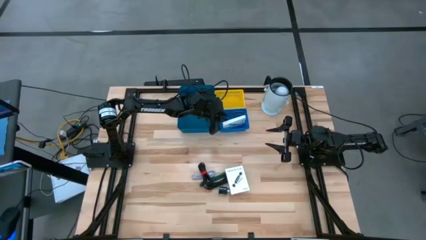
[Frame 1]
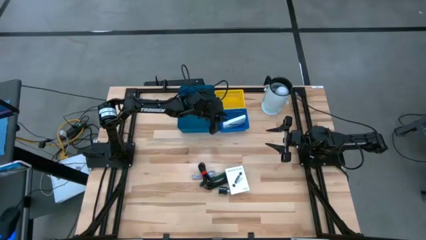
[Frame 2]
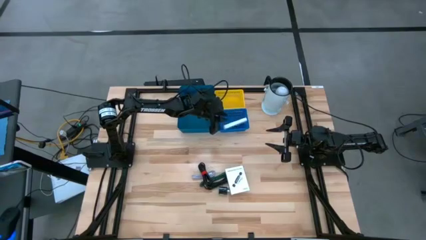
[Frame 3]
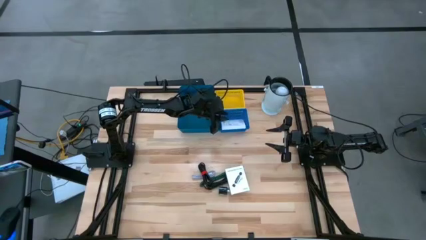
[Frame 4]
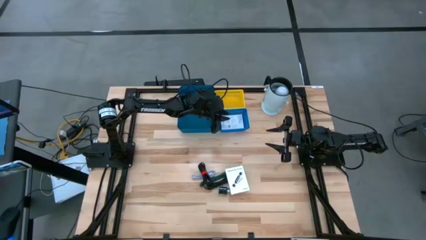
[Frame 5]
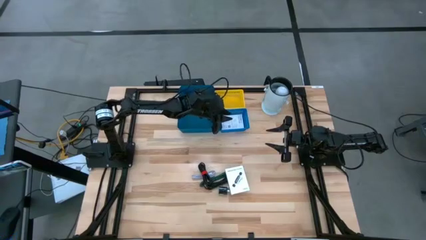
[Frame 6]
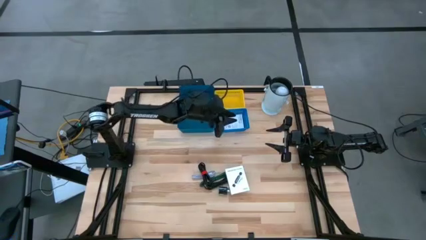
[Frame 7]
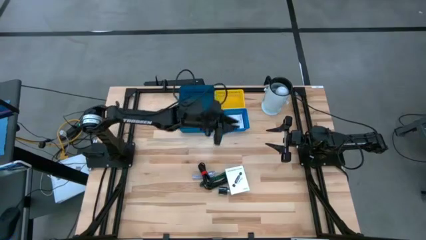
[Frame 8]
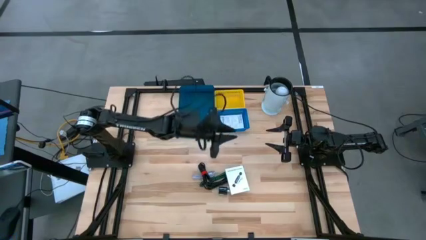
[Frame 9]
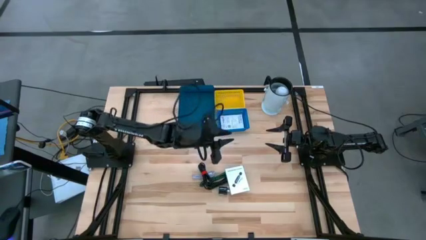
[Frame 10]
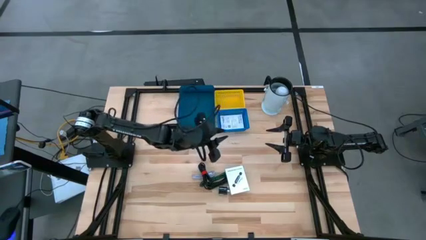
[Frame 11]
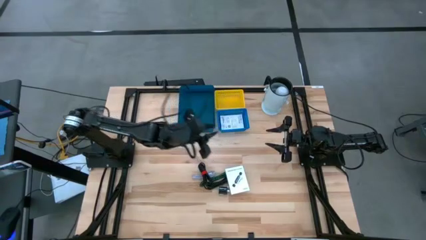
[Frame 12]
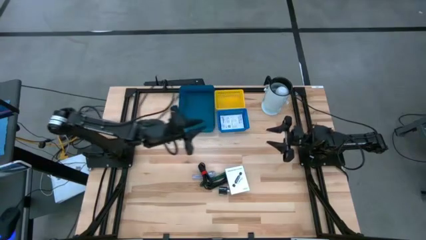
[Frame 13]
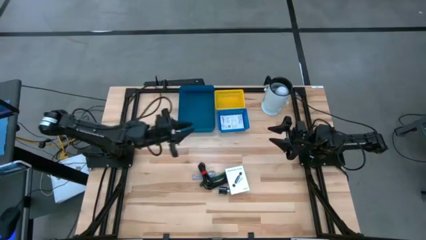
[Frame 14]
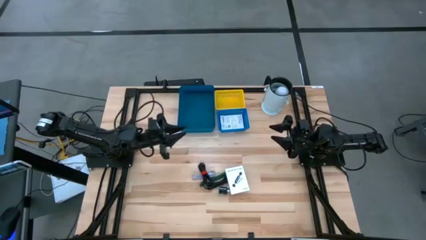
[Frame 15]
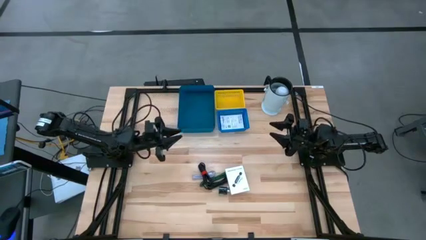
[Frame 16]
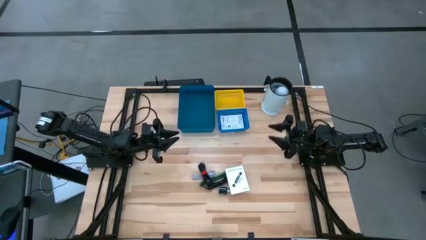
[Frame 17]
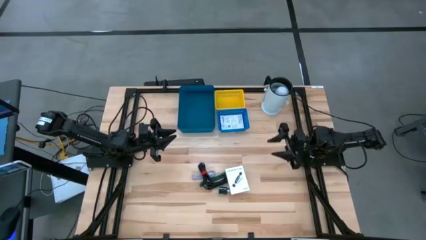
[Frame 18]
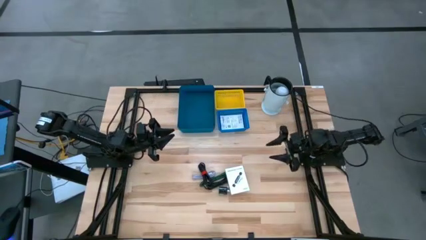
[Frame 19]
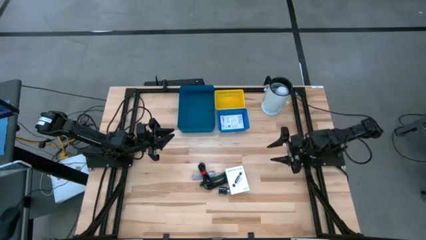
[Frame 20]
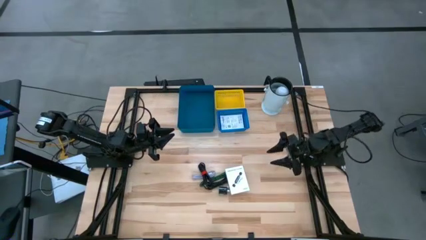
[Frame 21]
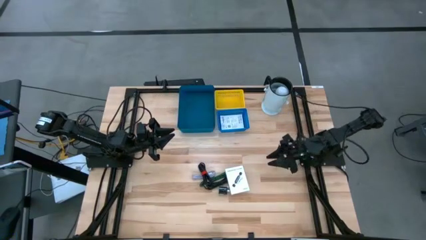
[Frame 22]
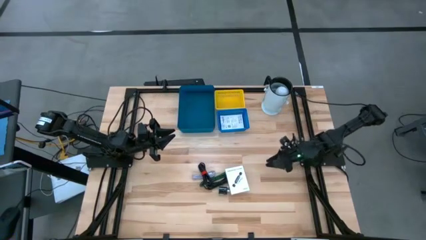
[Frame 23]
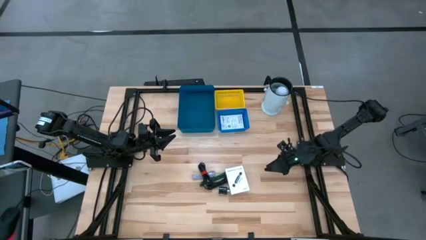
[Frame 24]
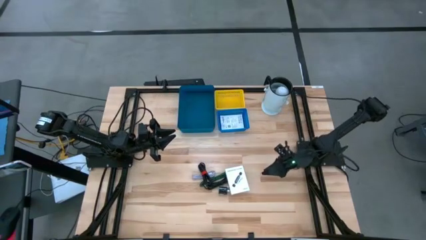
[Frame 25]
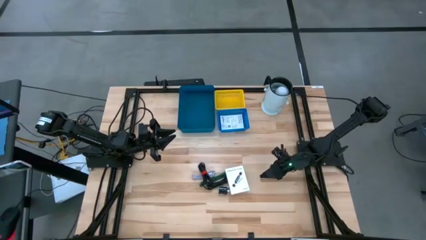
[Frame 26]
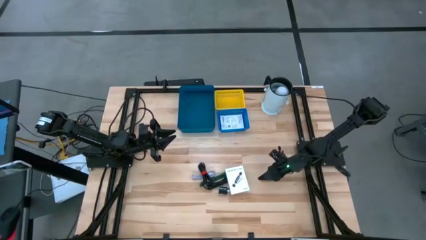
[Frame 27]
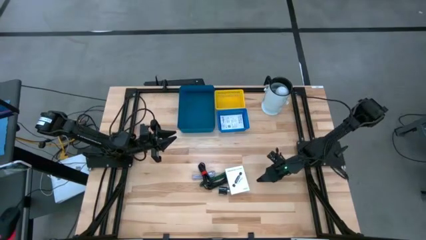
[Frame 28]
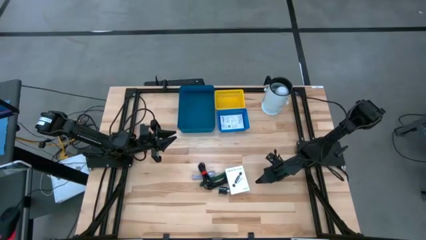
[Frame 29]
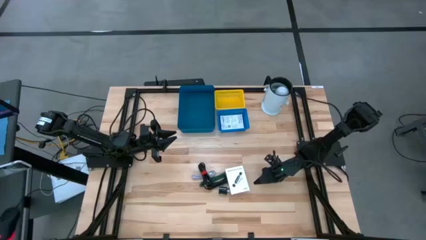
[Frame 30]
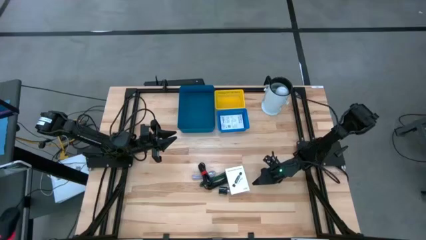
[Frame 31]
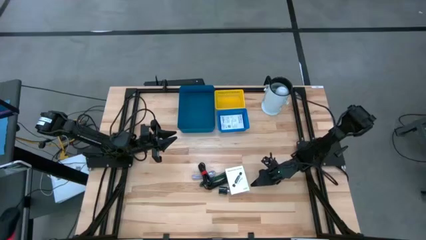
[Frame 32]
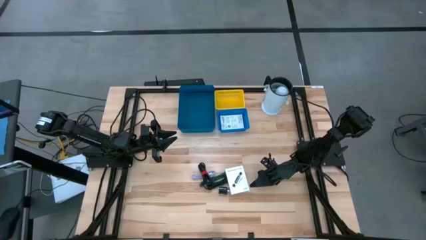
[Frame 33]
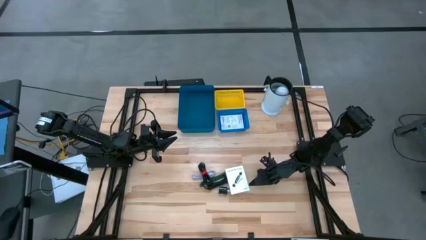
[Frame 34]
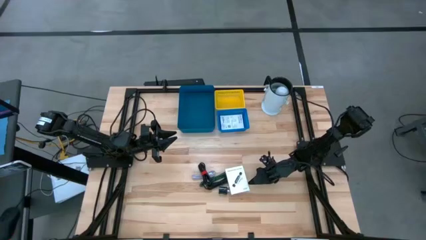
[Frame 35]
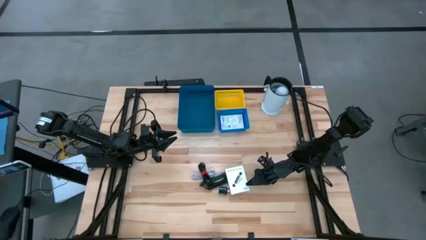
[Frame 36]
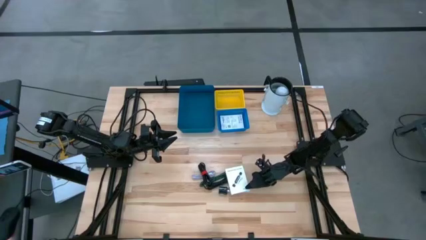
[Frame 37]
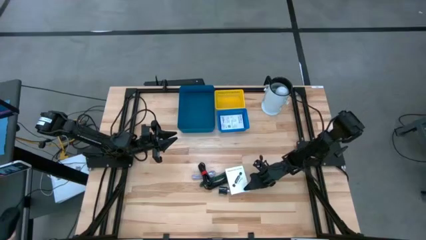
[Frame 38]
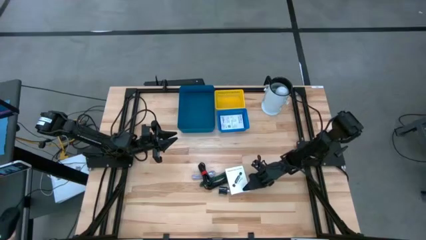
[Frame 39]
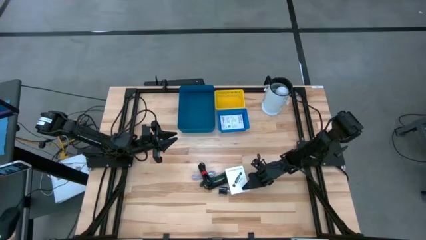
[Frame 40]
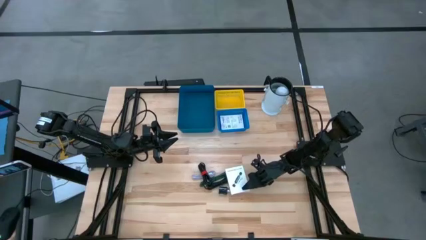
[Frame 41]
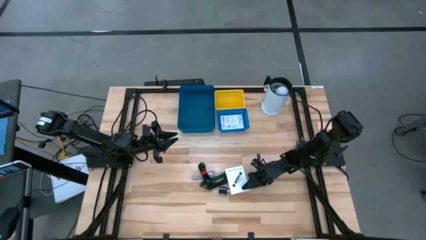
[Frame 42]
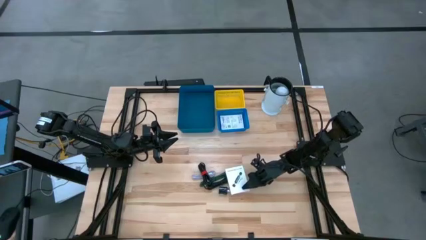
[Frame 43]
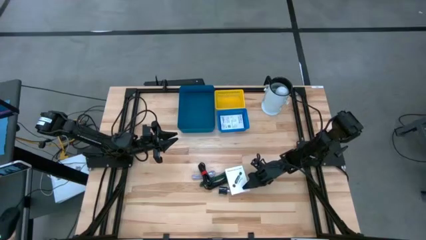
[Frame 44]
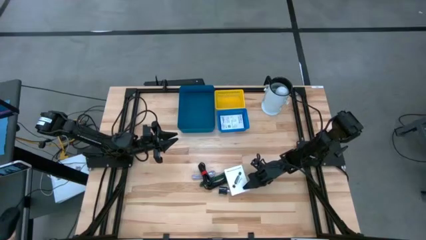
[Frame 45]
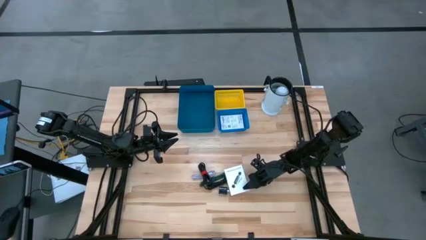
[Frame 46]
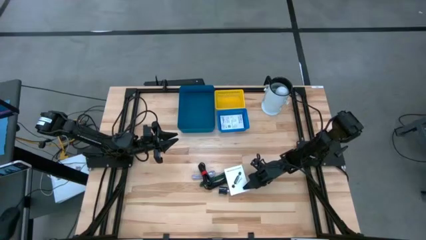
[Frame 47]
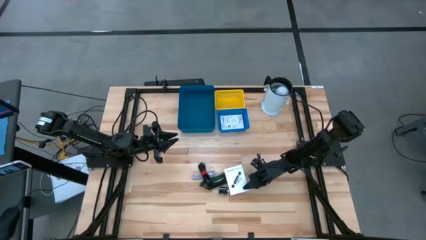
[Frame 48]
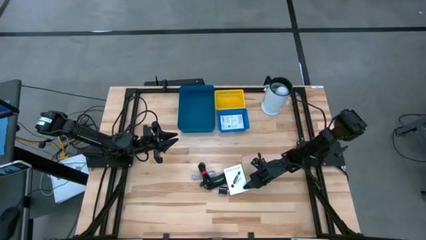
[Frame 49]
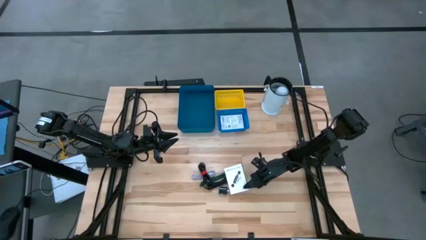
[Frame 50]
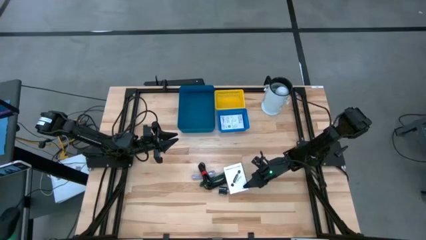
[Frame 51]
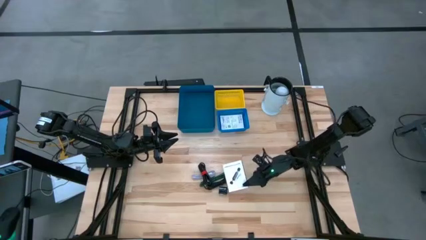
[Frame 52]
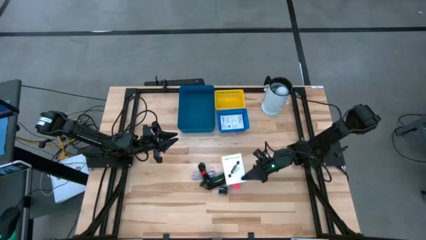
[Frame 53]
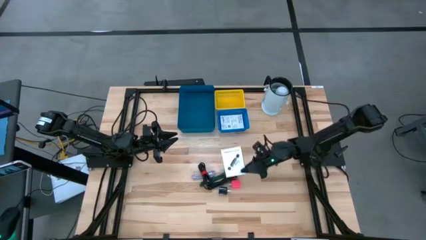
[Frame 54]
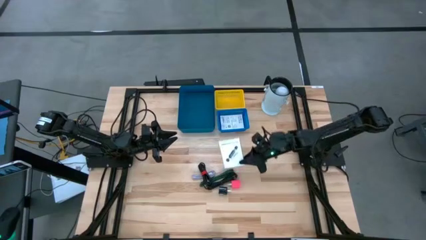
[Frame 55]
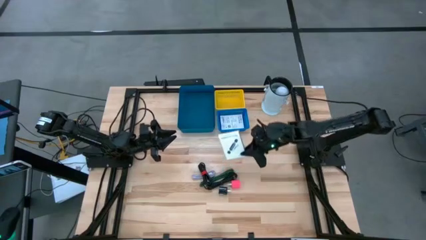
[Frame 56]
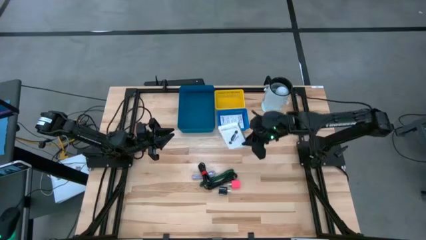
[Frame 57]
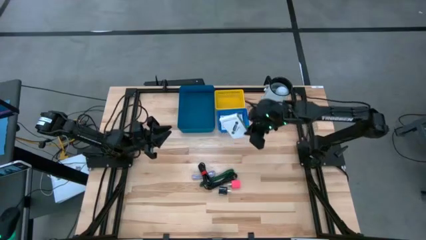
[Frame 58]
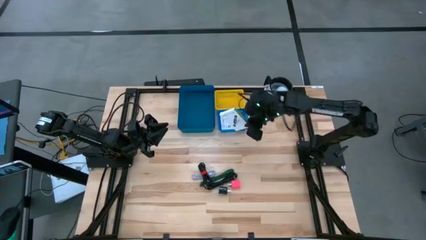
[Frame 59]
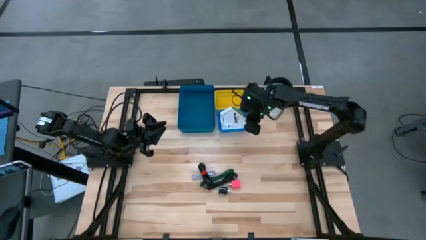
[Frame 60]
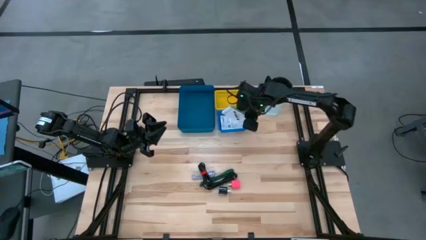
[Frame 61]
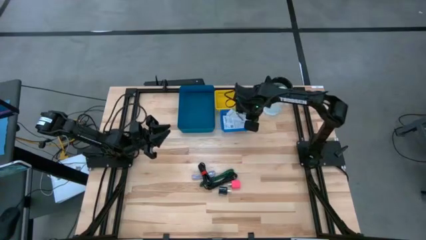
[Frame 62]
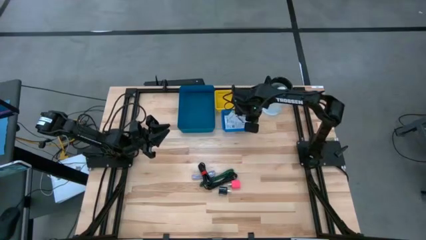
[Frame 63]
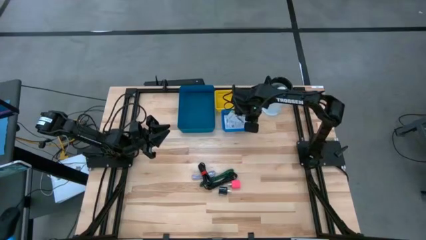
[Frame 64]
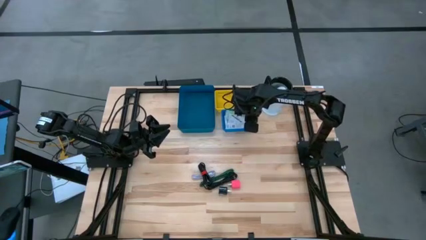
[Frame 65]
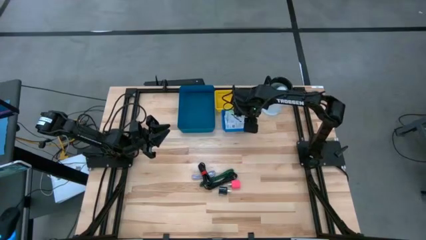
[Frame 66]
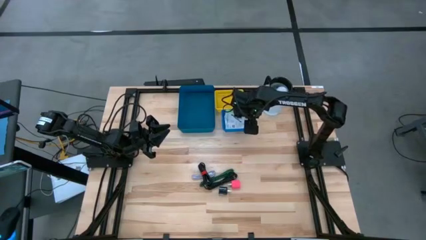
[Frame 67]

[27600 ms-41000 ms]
Task: Pick and place items into bin
Put the white card reader box into the blue bin
